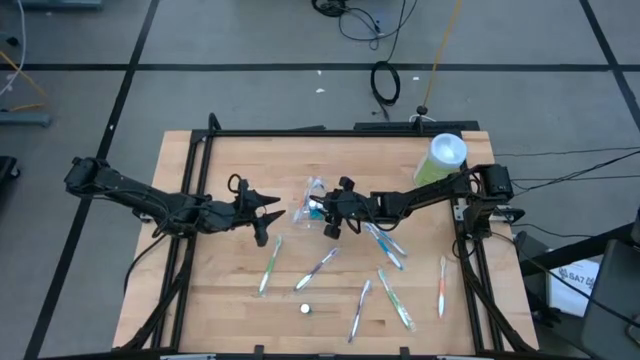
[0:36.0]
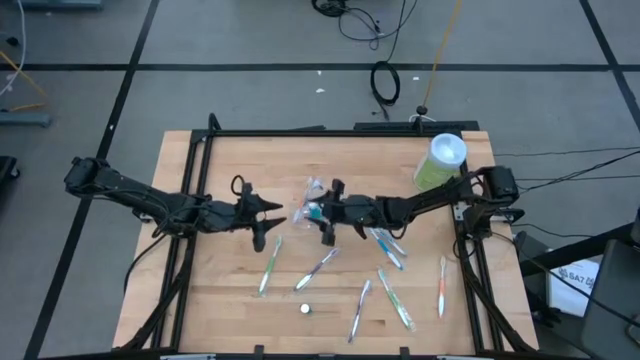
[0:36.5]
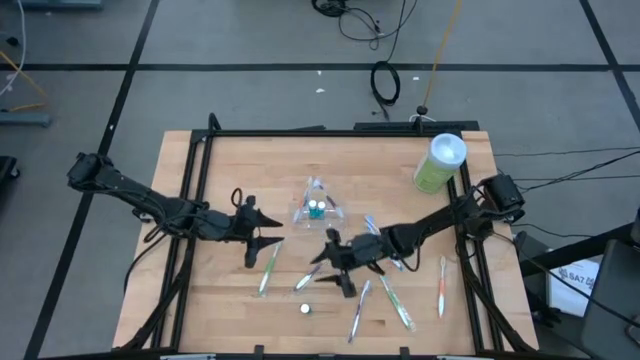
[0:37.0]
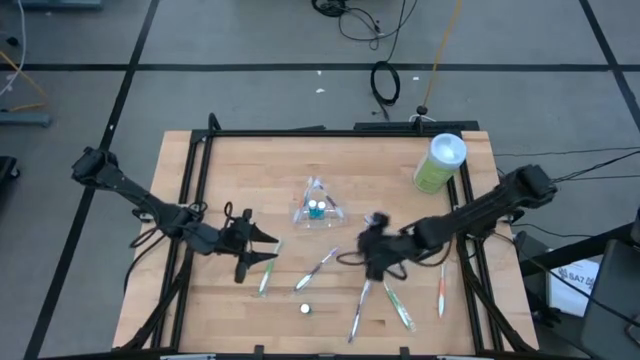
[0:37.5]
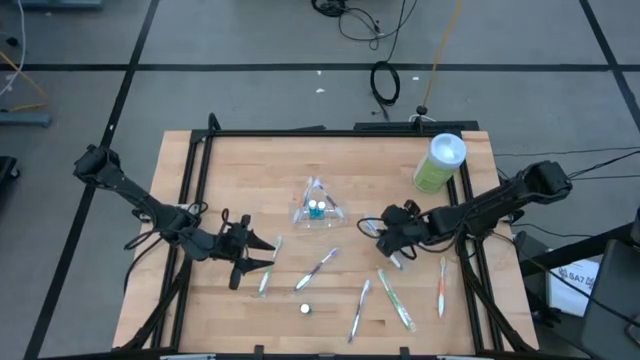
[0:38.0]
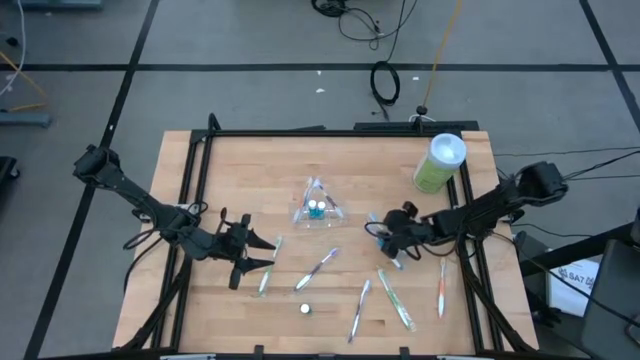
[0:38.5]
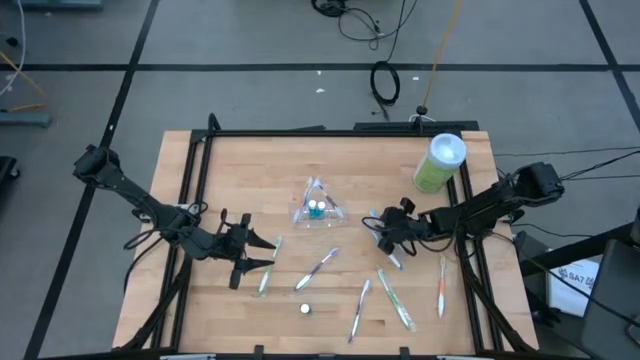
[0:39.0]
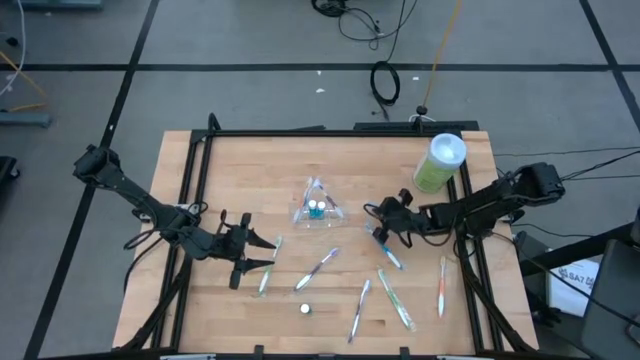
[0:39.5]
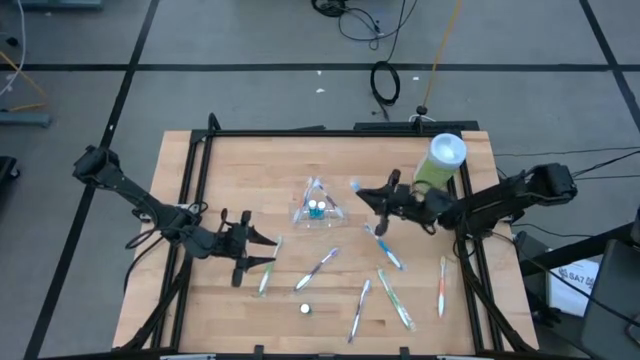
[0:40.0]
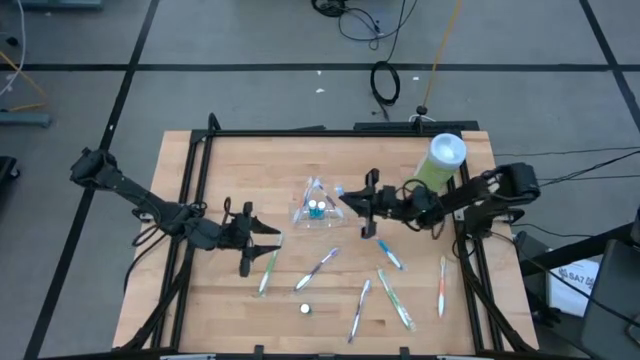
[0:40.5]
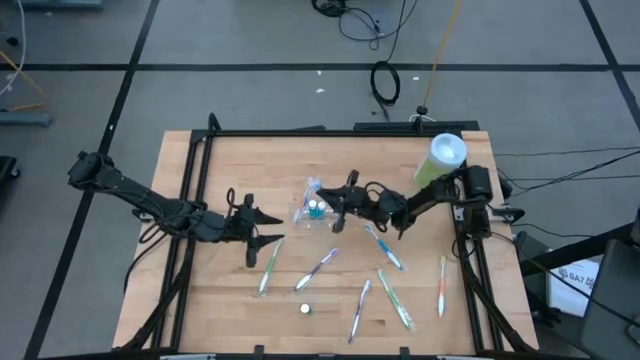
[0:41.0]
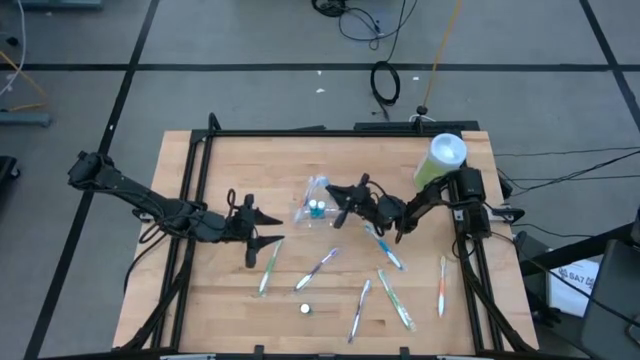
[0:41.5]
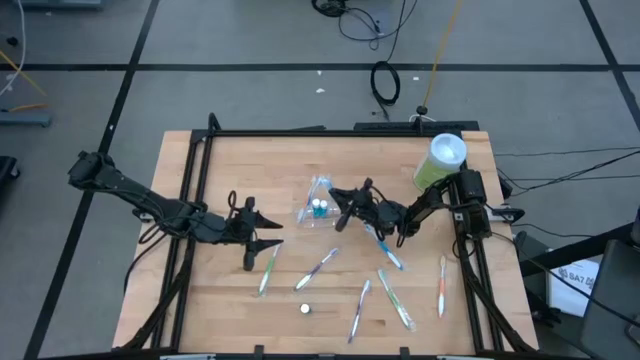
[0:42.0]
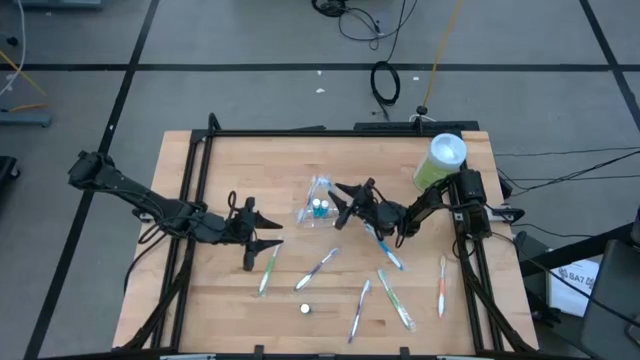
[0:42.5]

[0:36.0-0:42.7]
Task: Pick & Place toothbrushing station
Put the right blue toothbrush into the transparent organizer

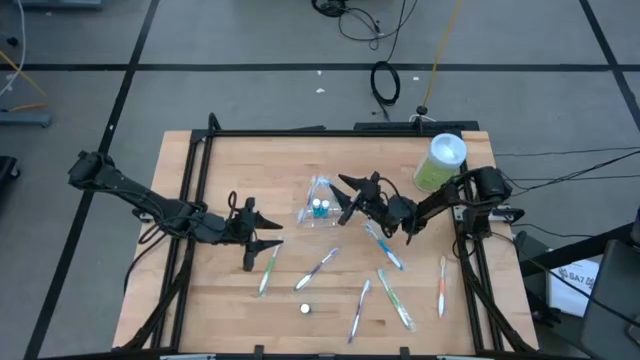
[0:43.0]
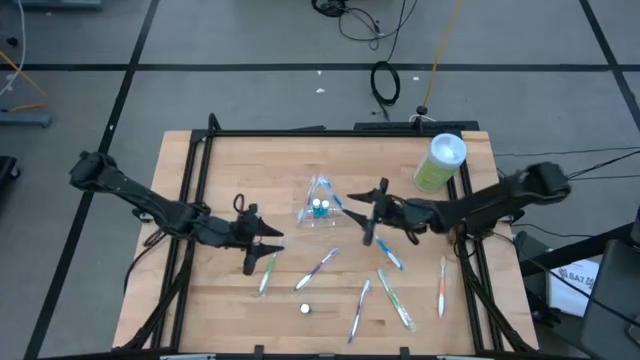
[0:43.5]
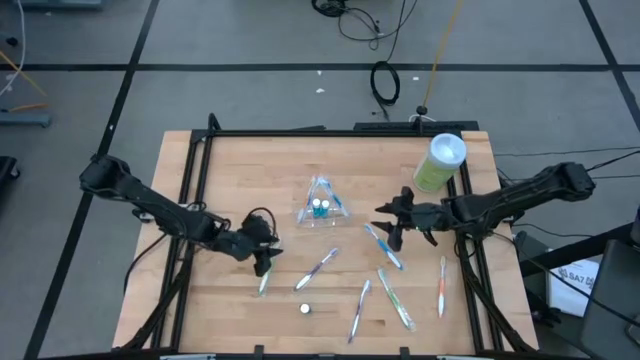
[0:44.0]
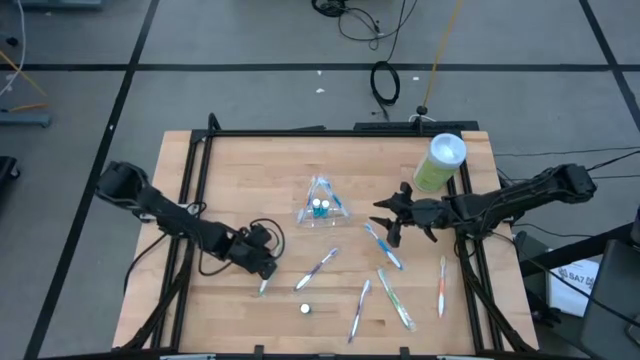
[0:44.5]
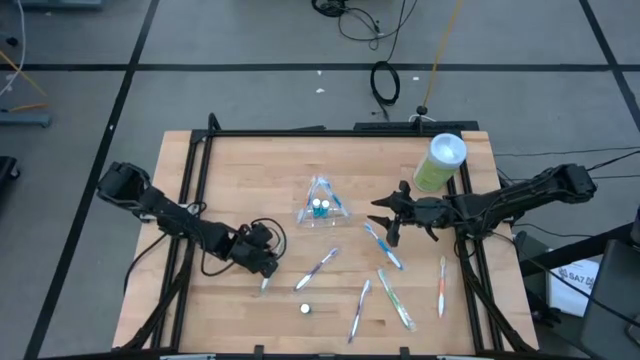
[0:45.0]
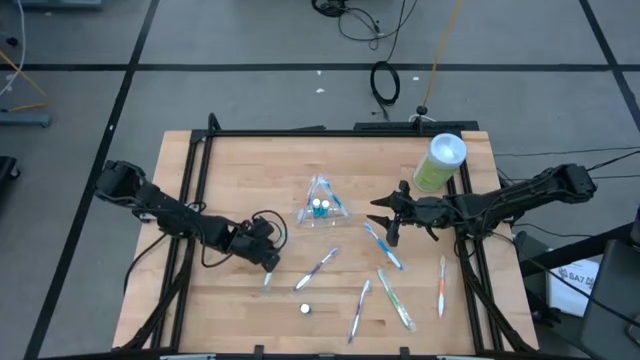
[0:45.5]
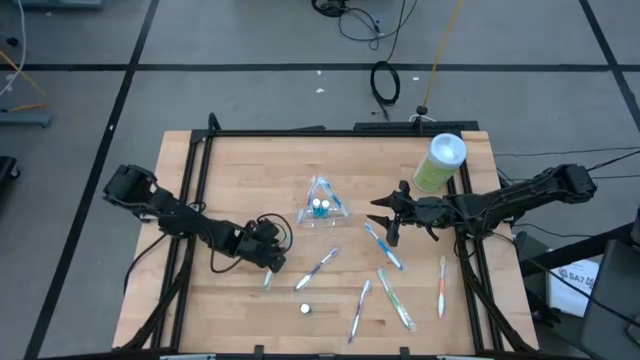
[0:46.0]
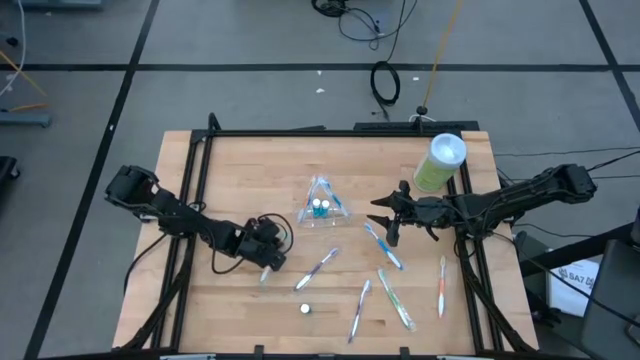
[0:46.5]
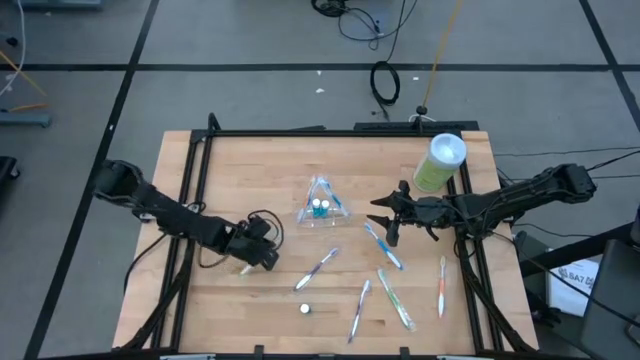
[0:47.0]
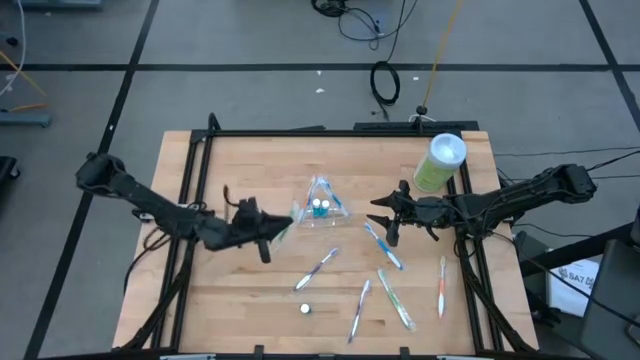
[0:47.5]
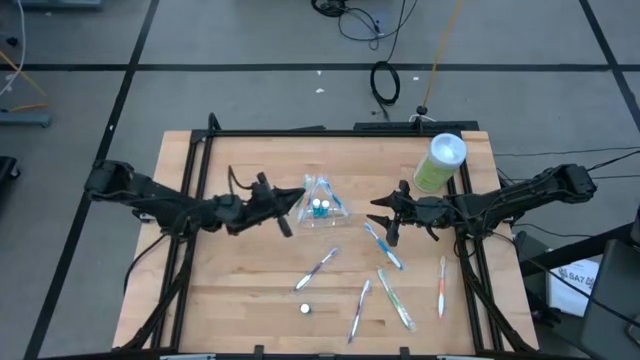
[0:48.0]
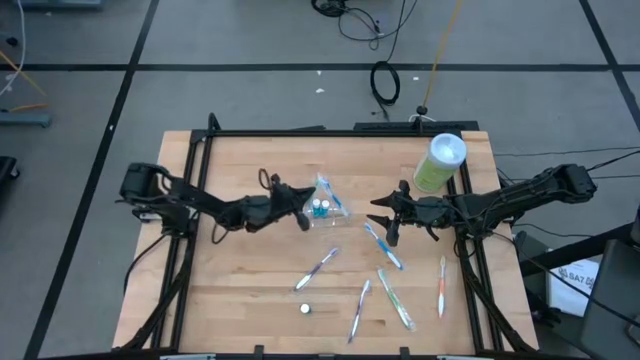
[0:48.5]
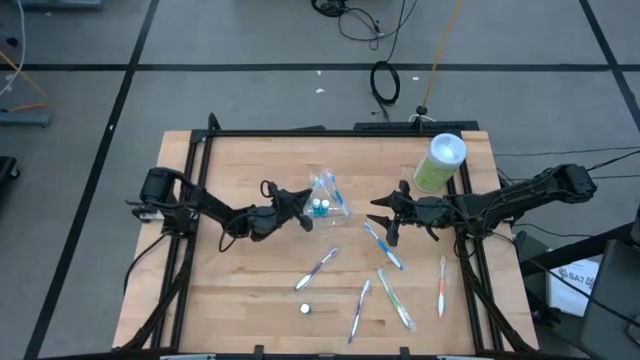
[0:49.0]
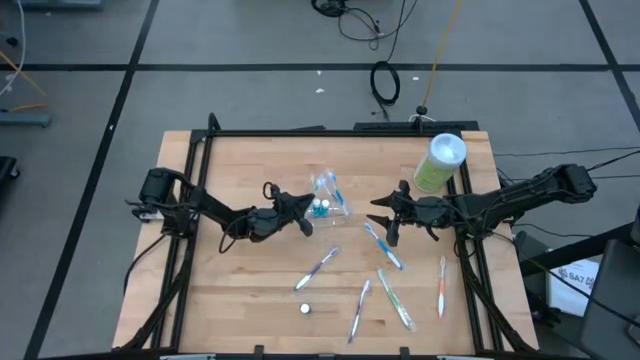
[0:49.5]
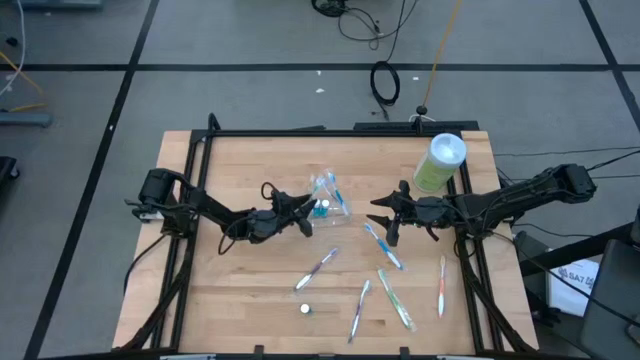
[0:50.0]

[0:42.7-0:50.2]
Put the top green toothbrush into the transparent organizer

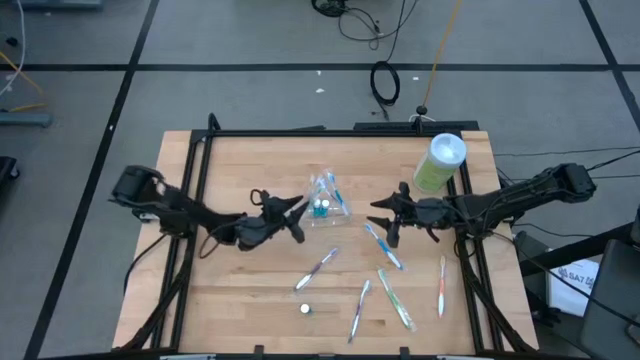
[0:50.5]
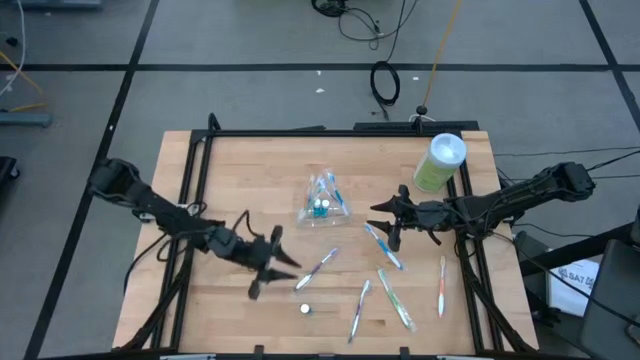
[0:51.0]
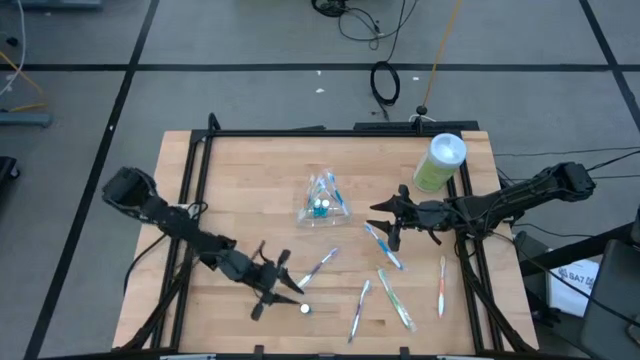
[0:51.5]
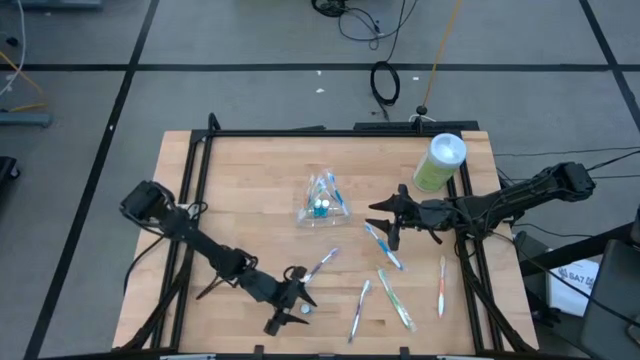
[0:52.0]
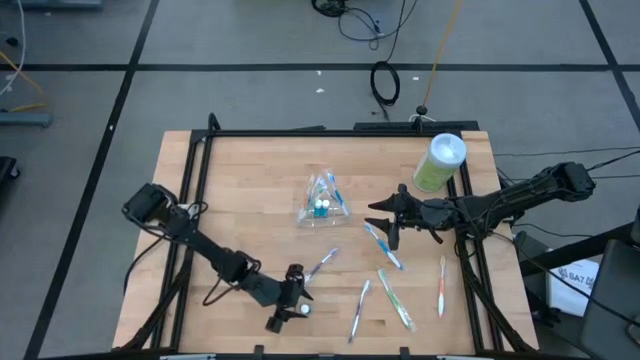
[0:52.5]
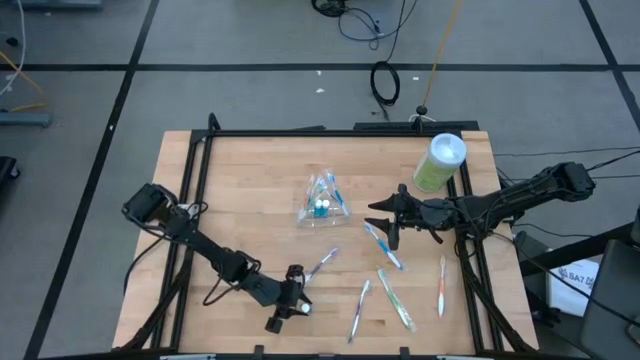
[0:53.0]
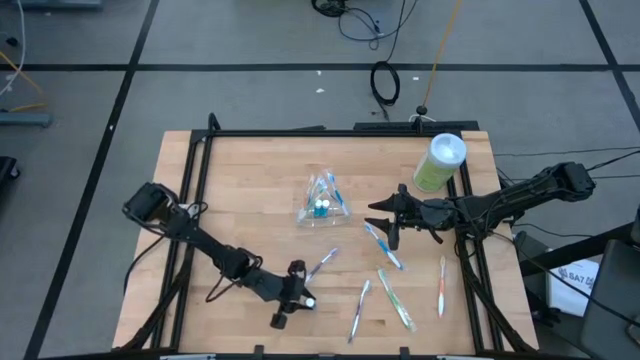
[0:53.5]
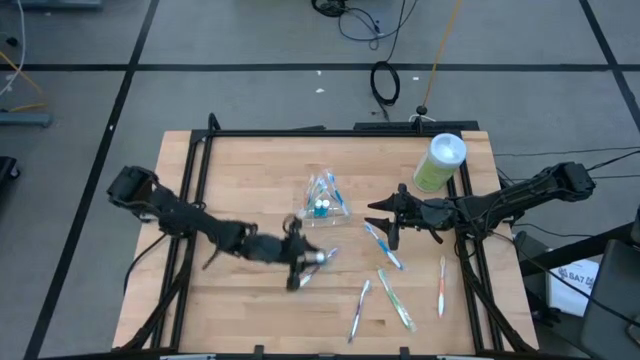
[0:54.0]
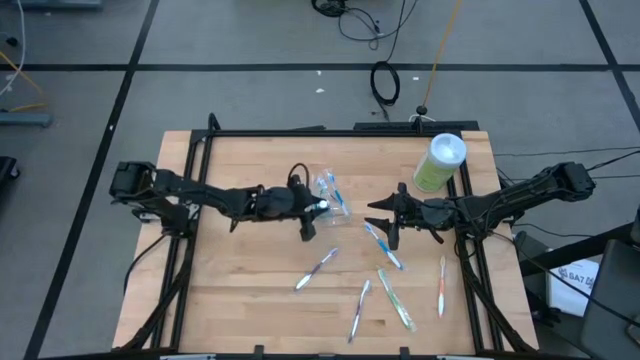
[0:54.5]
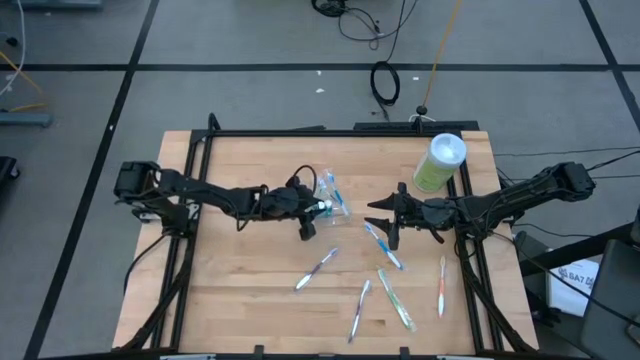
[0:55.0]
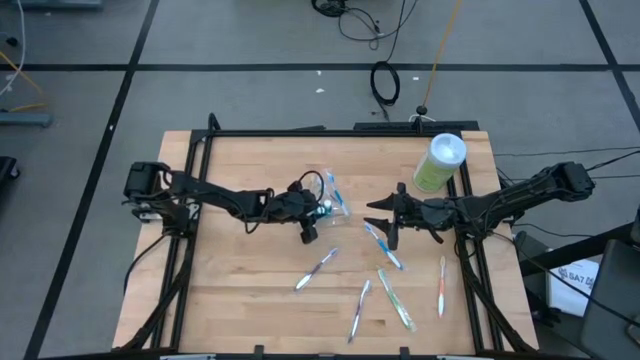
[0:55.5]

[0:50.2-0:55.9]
Put the blue mouthwash into the transparent organizer

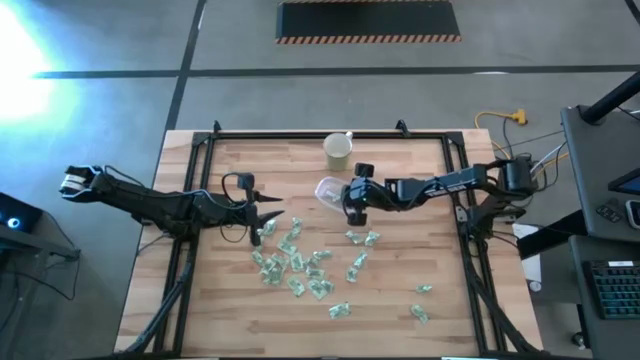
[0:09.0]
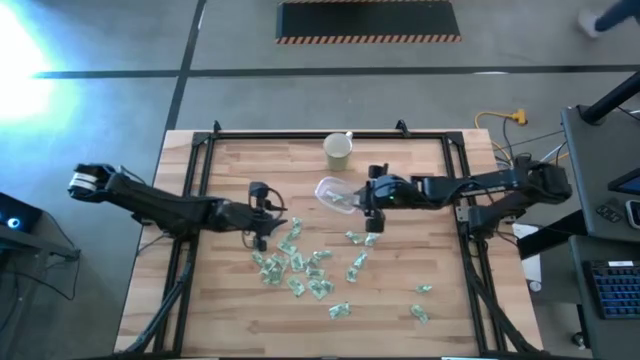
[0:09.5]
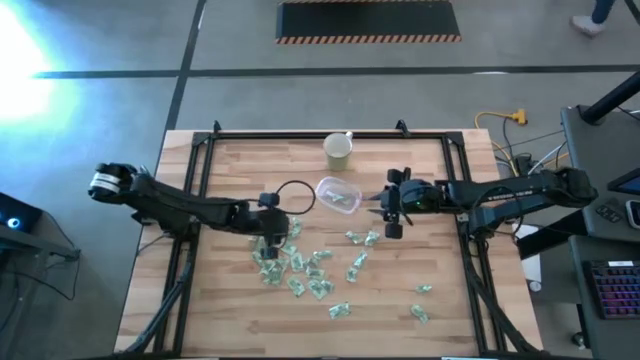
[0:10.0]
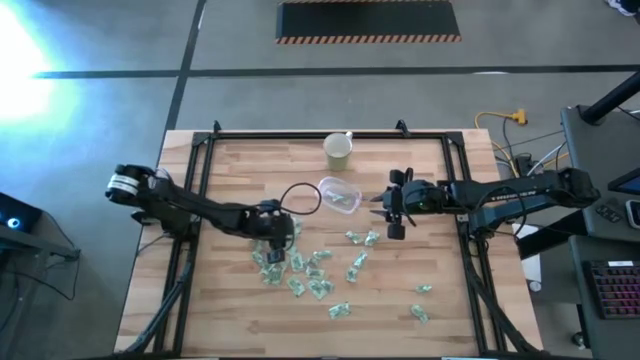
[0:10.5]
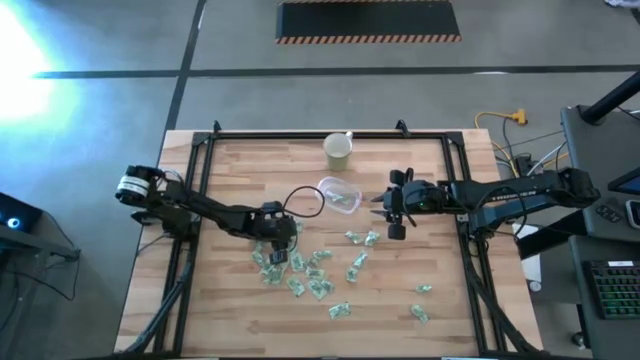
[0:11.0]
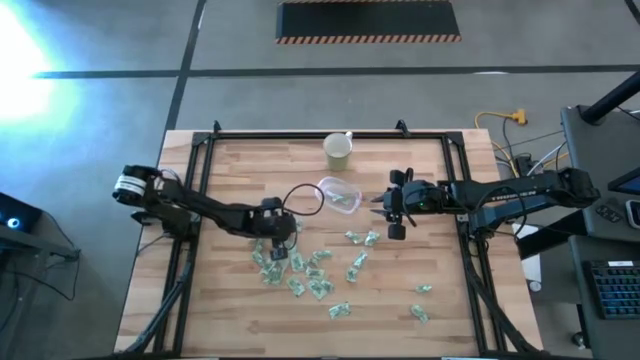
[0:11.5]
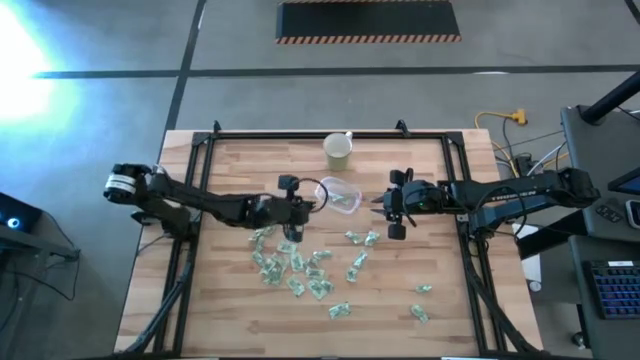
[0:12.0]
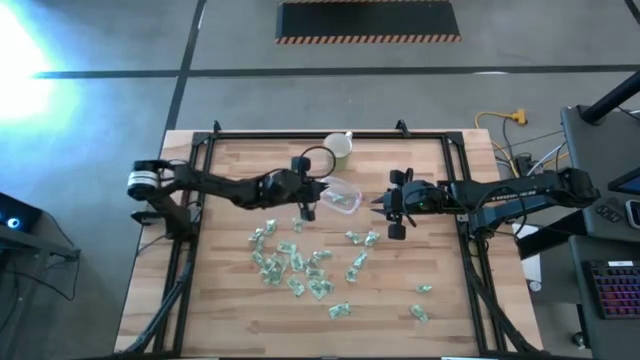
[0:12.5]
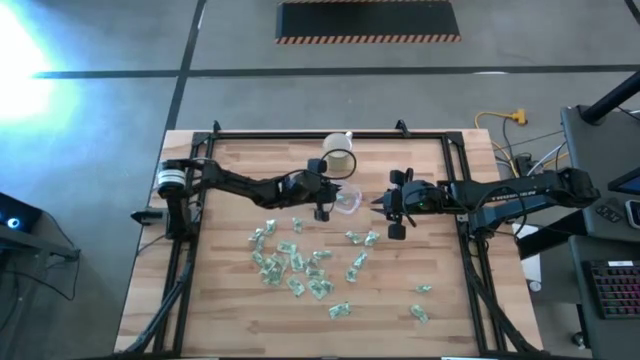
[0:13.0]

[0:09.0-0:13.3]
Task: Pick and place items into bin
Put the green stevia packet into the transparent bin
